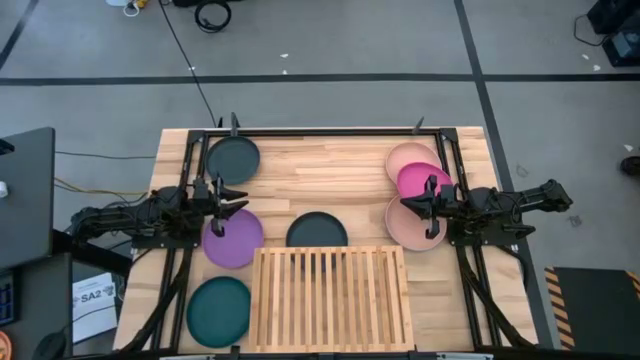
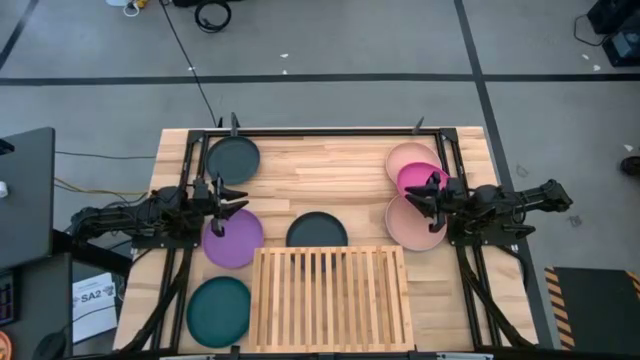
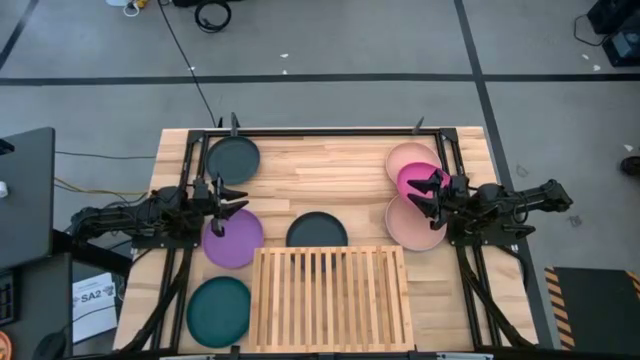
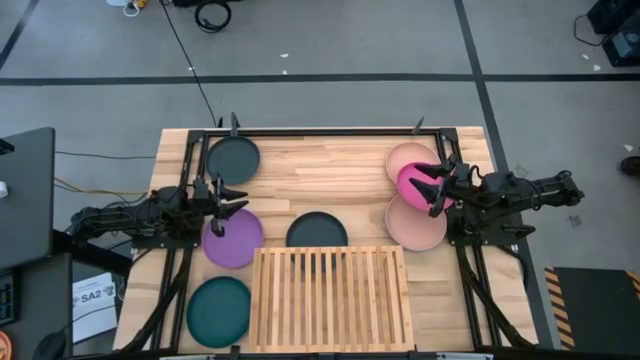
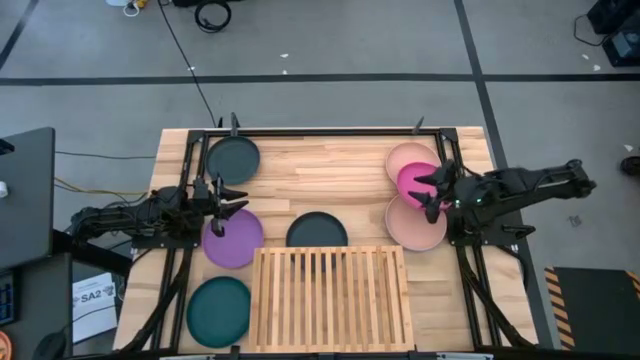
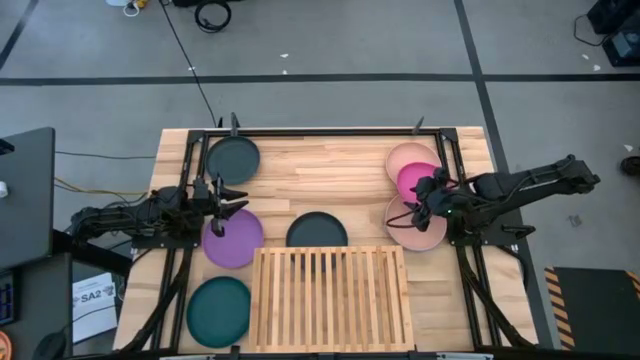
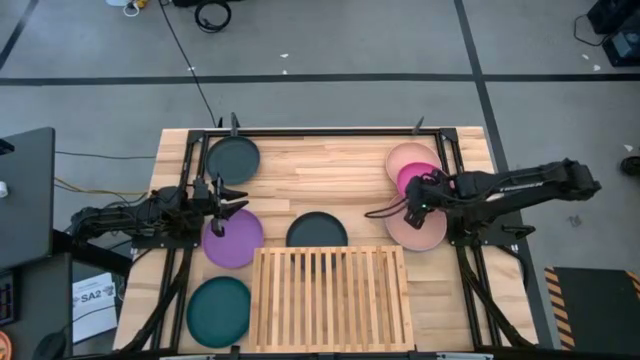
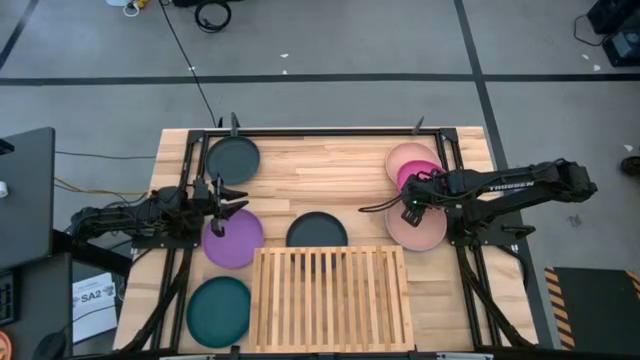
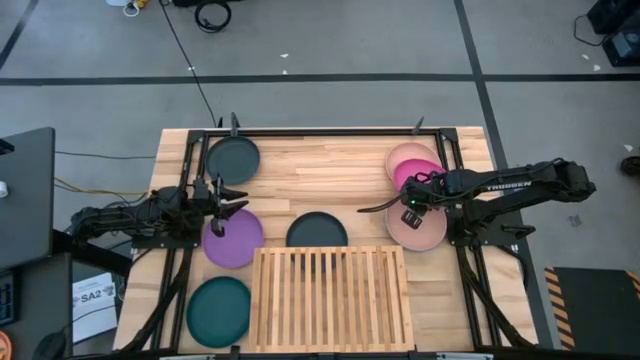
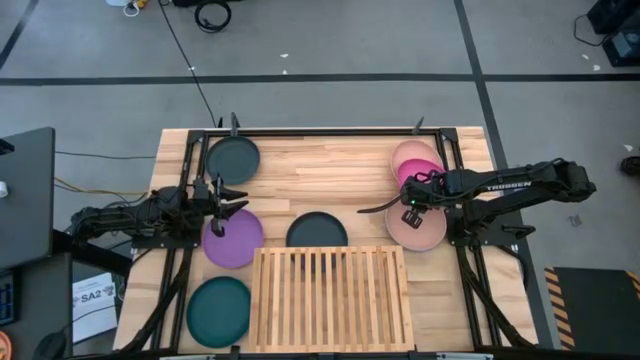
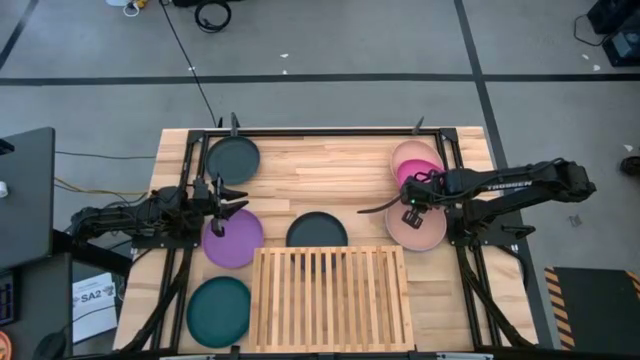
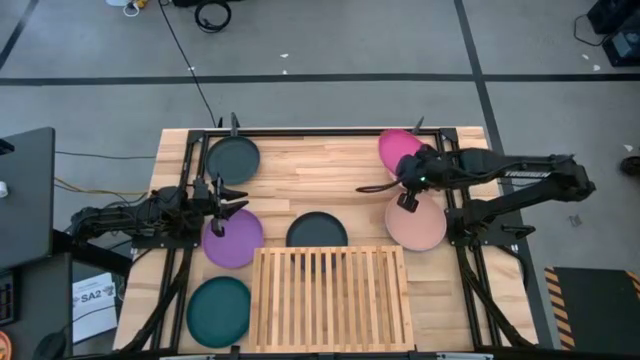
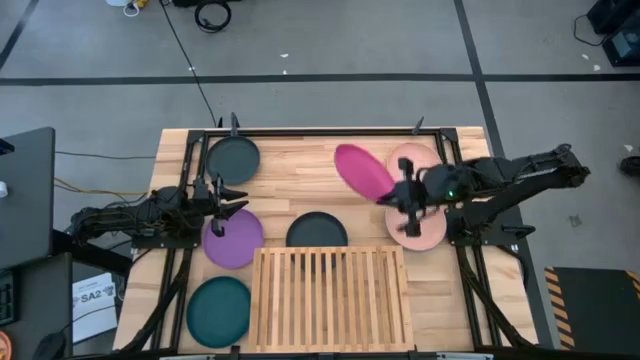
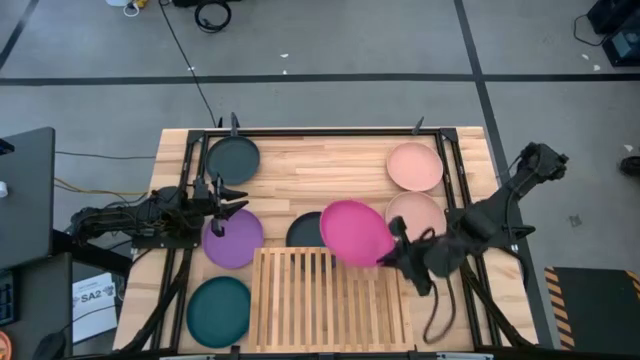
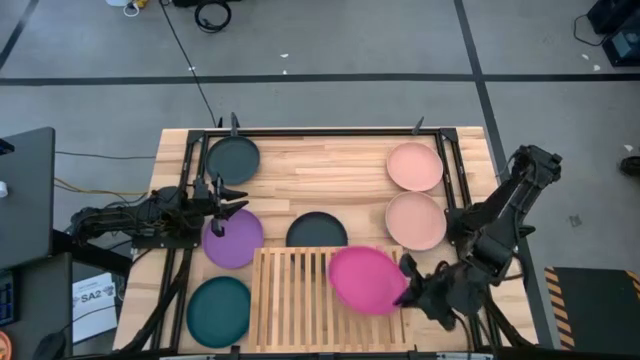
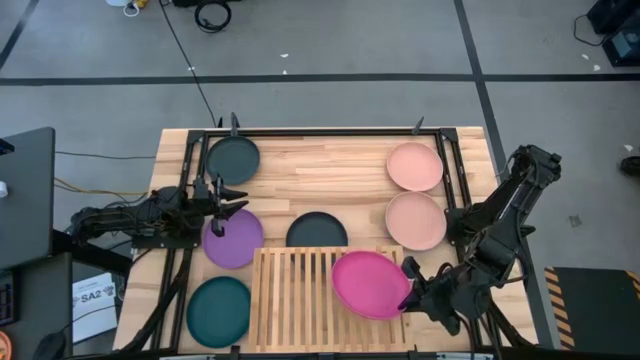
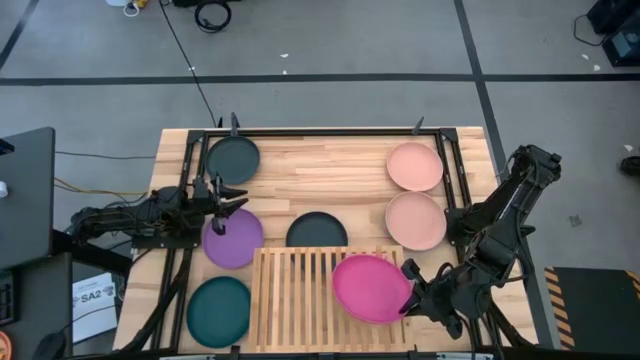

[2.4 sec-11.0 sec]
Task: Place and stack plates onto a shelf
Put the pink plate on the shelf

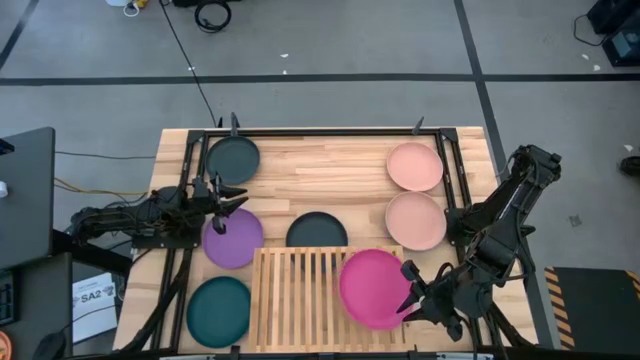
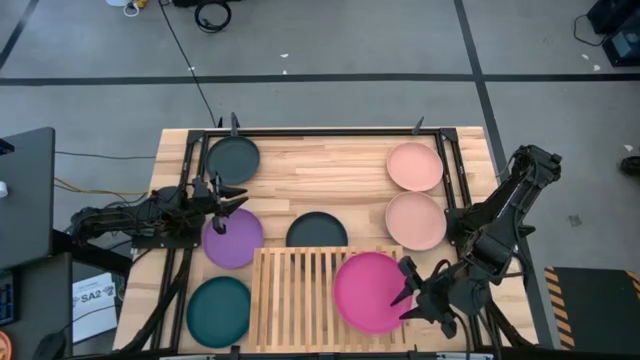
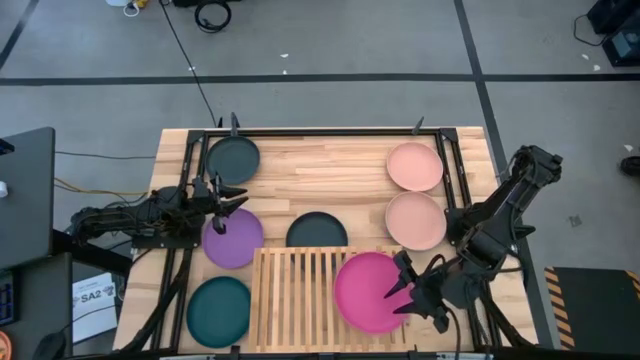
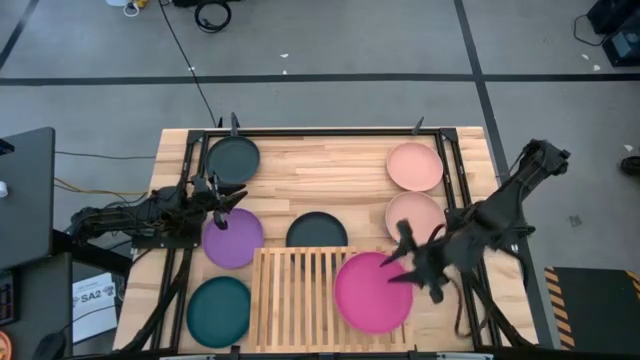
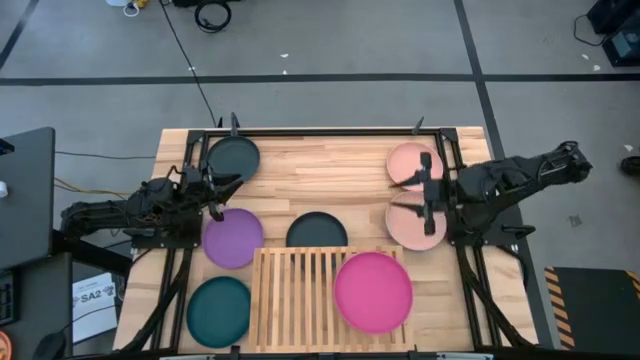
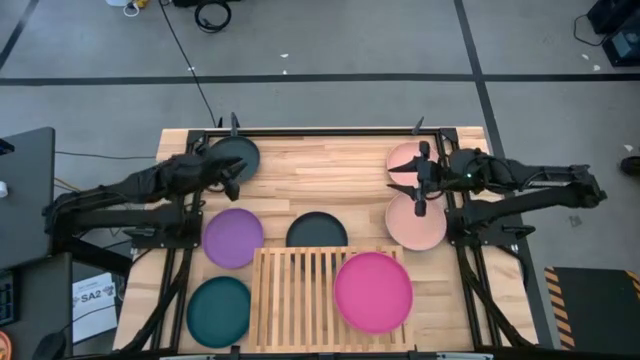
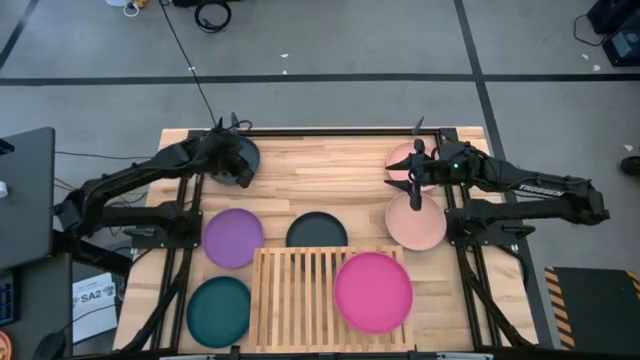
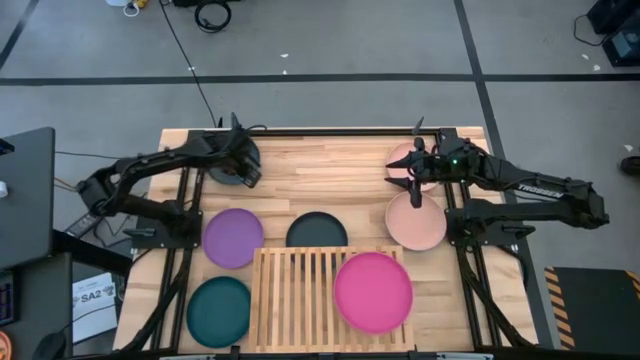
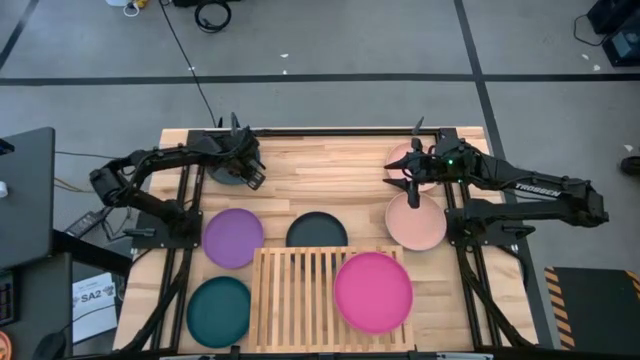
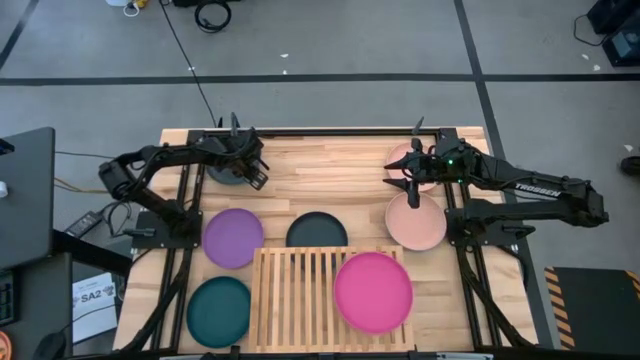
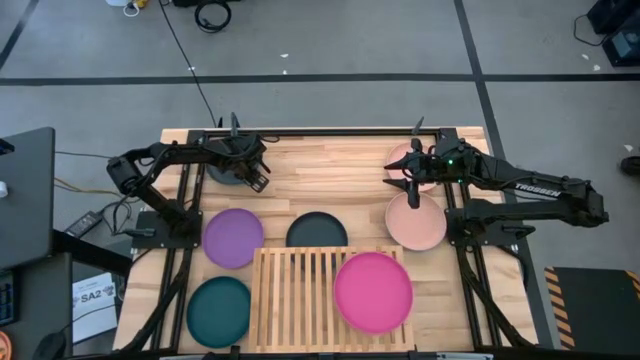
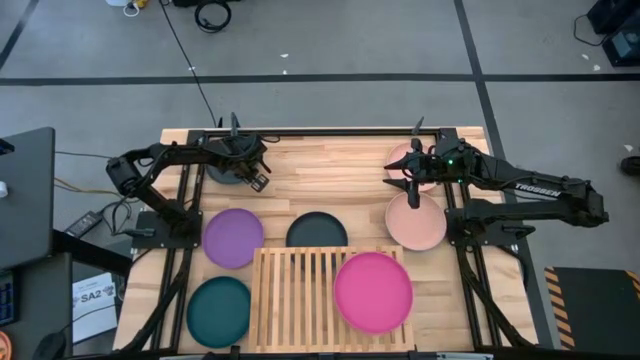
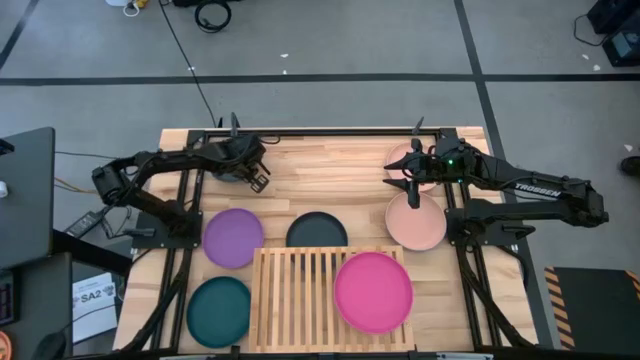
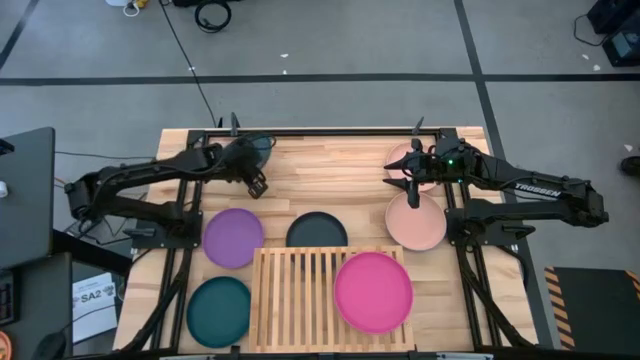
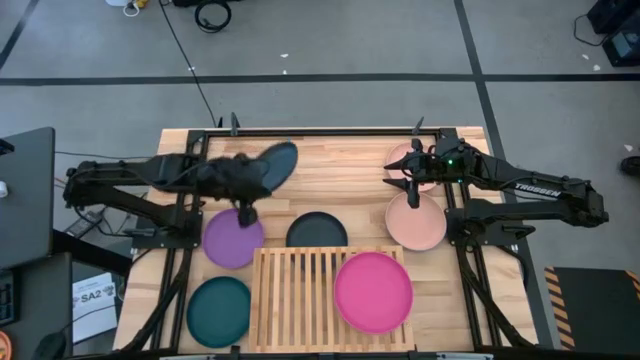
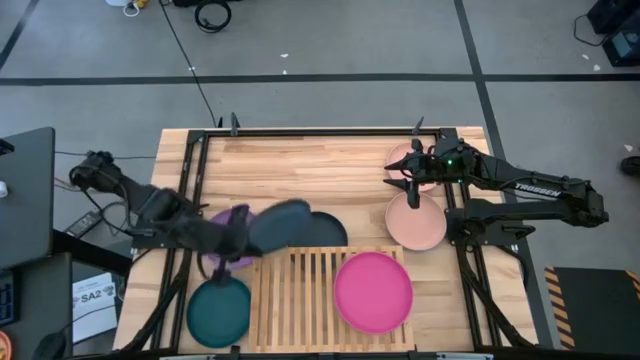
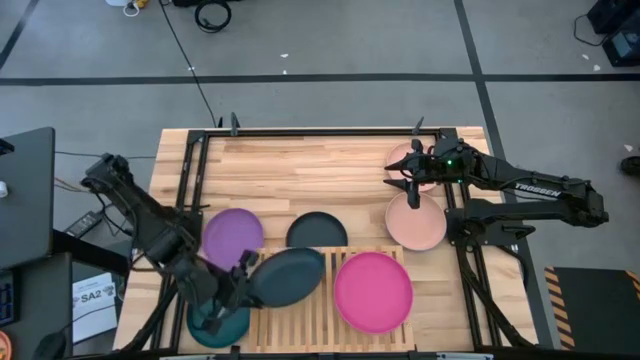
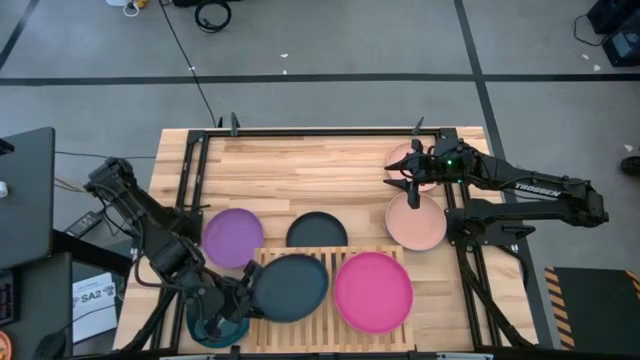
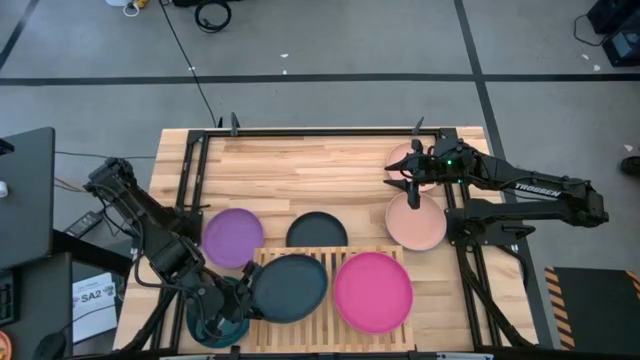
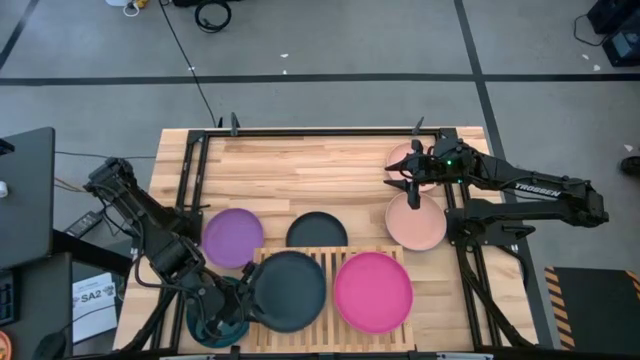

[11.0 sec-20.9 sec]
Put the top black plate on the shelf

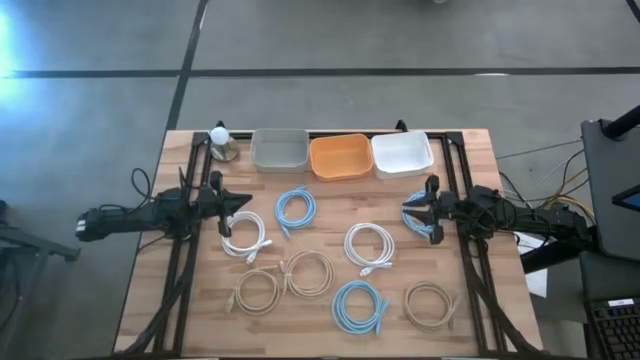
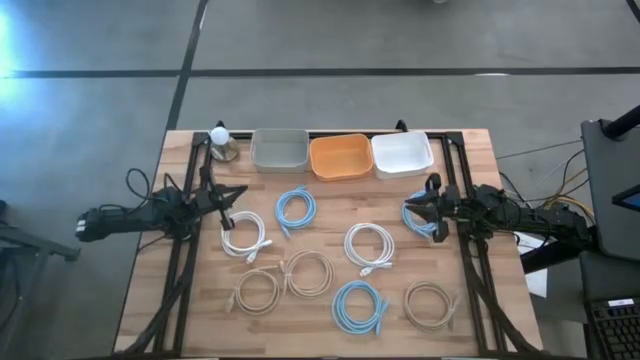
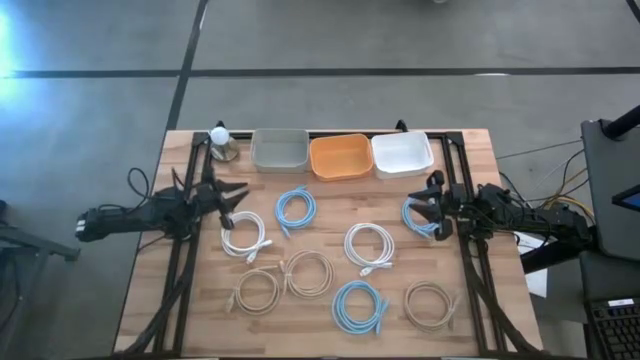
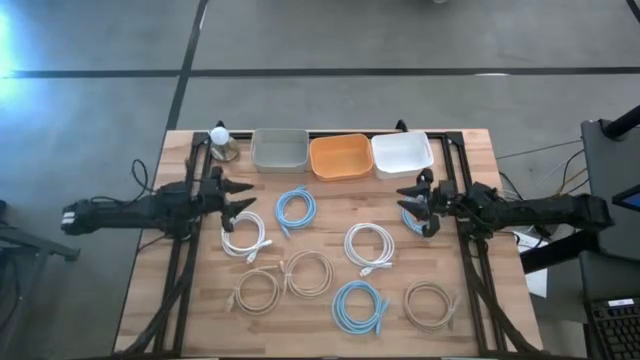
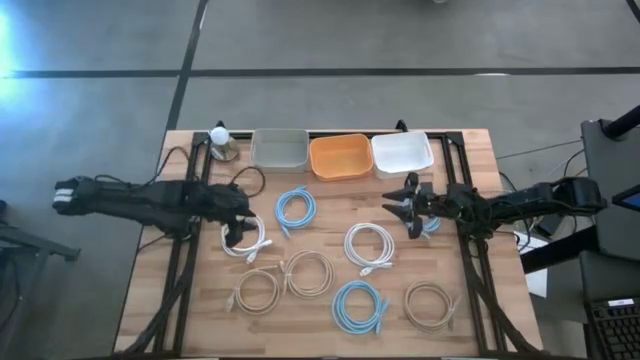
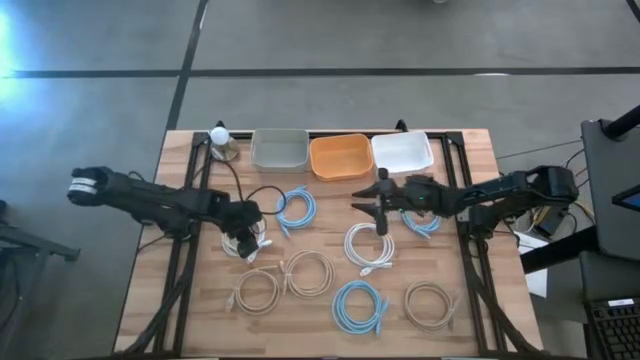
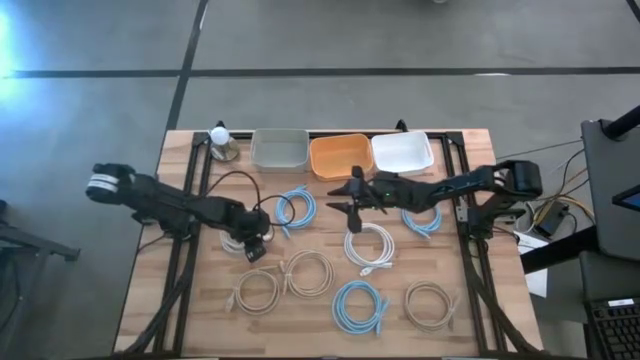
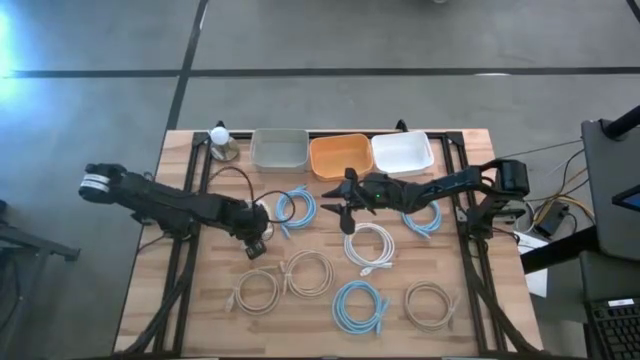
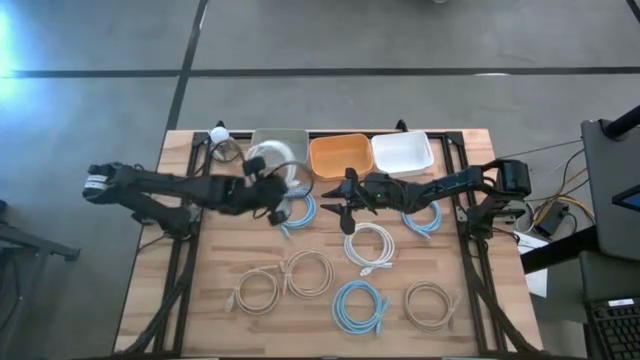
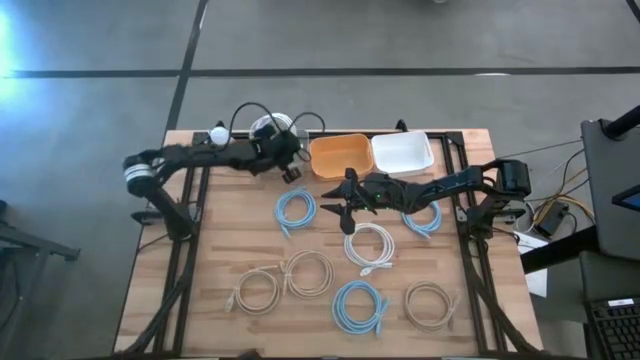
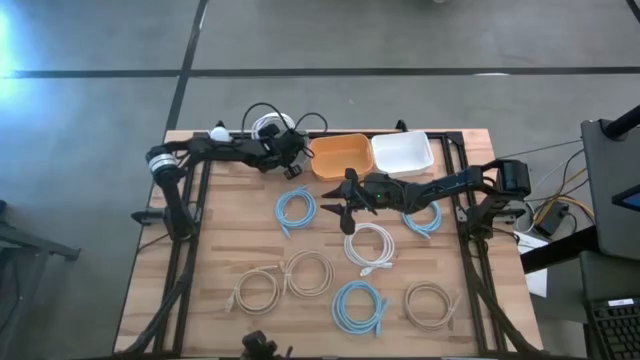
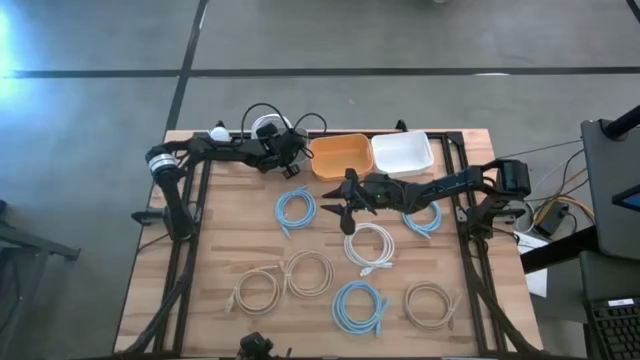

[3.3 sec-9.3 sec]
Task: Pick & Place USB Port
Put the left white charger cable into the gray bin
